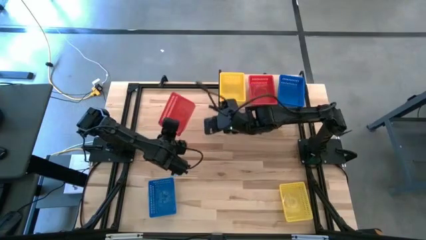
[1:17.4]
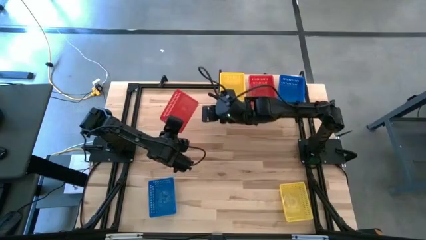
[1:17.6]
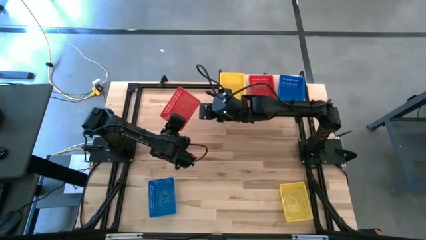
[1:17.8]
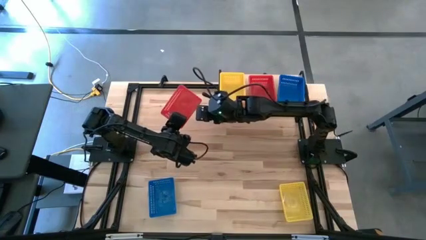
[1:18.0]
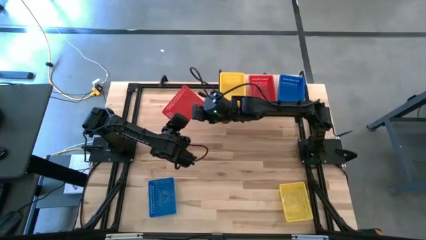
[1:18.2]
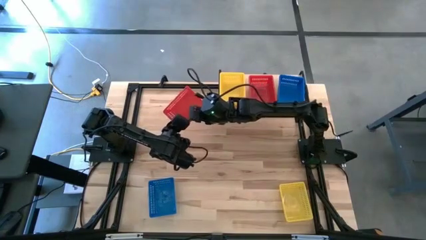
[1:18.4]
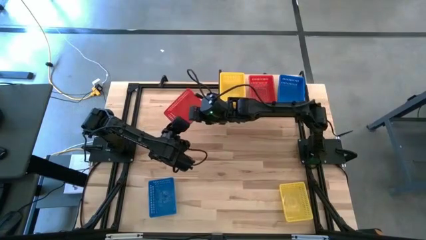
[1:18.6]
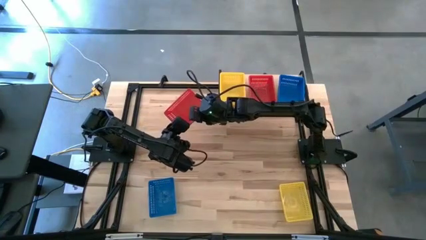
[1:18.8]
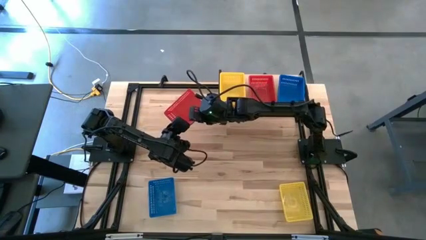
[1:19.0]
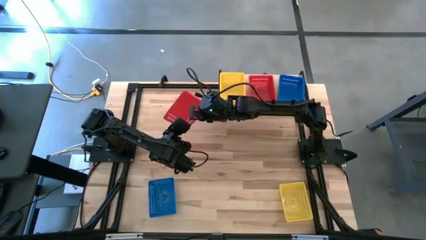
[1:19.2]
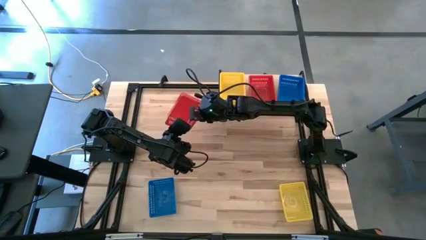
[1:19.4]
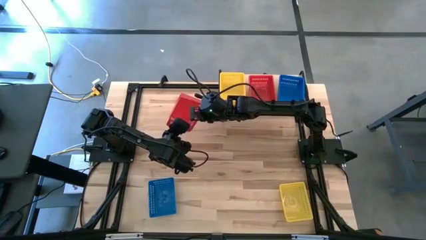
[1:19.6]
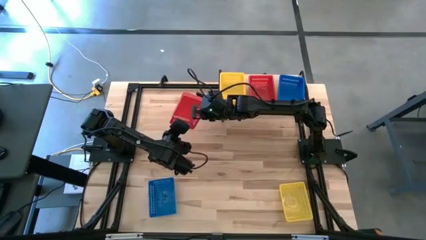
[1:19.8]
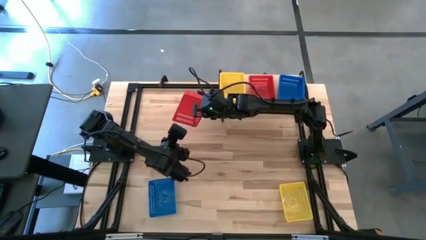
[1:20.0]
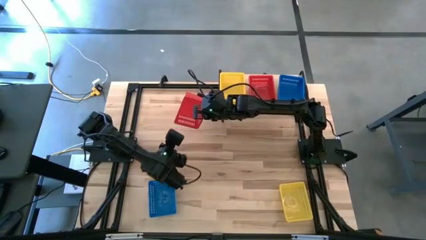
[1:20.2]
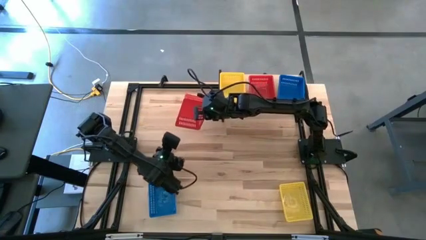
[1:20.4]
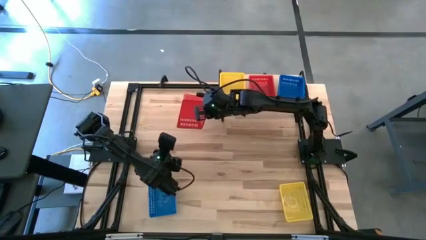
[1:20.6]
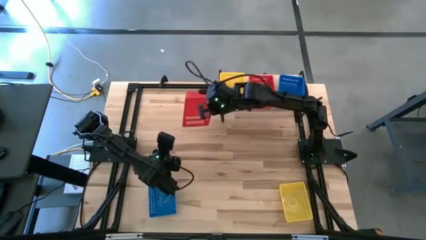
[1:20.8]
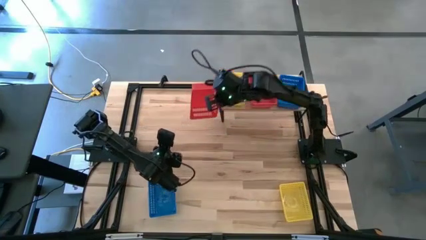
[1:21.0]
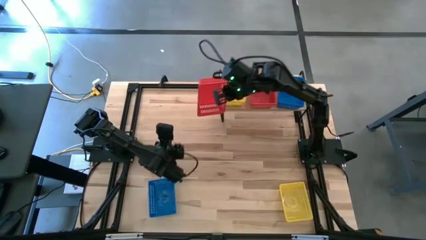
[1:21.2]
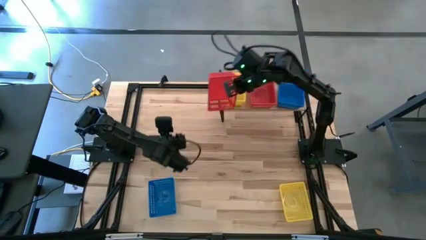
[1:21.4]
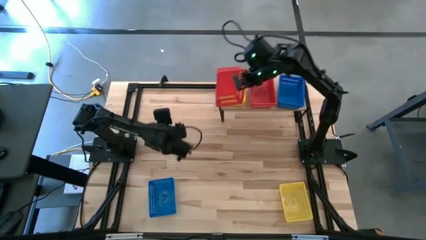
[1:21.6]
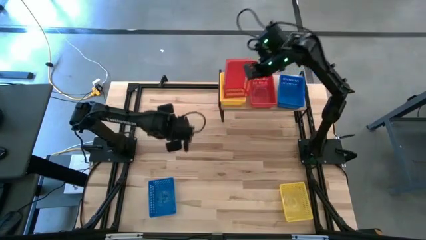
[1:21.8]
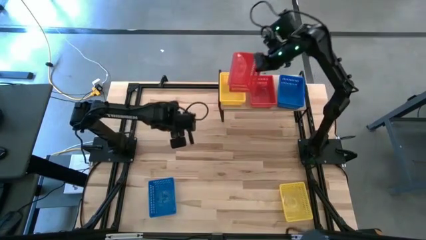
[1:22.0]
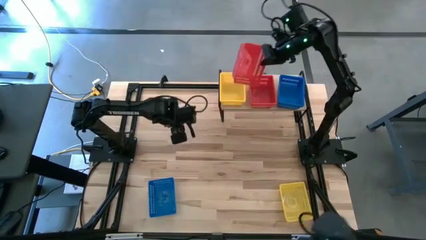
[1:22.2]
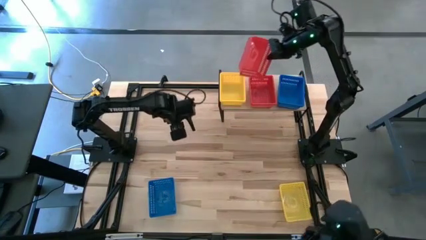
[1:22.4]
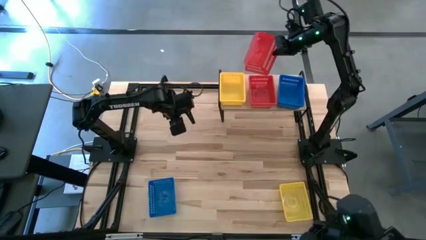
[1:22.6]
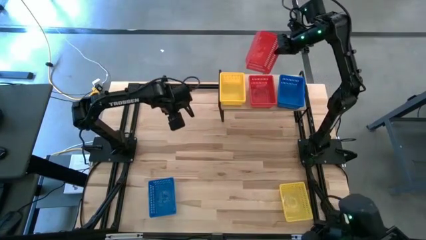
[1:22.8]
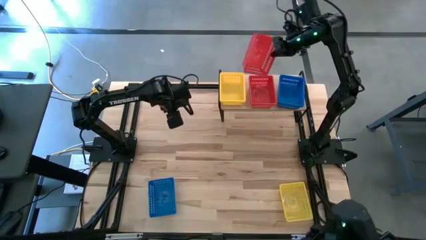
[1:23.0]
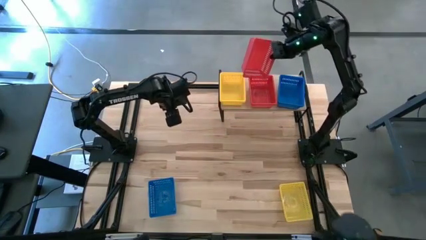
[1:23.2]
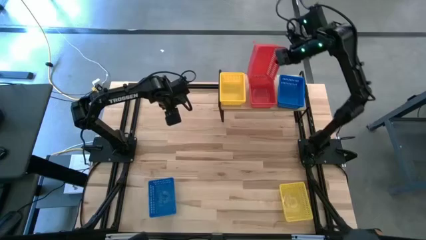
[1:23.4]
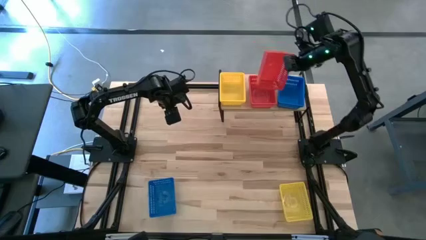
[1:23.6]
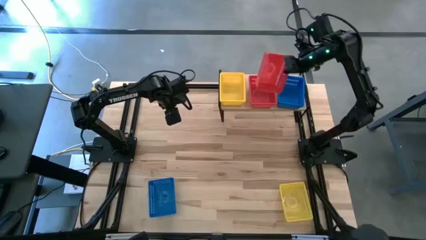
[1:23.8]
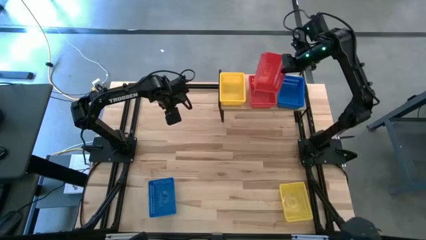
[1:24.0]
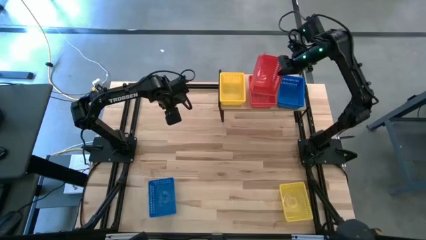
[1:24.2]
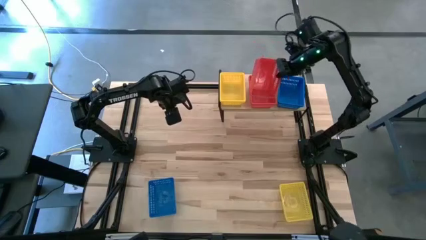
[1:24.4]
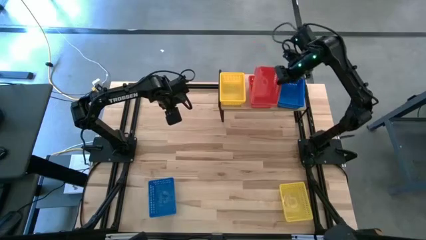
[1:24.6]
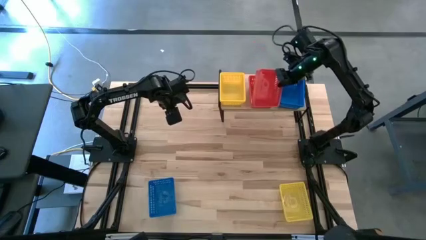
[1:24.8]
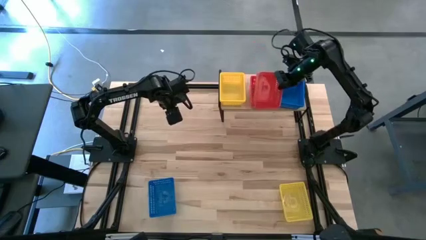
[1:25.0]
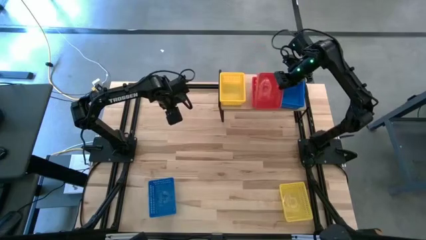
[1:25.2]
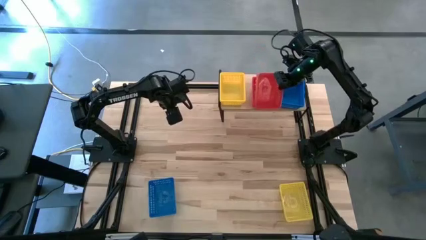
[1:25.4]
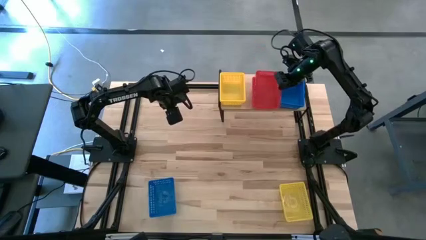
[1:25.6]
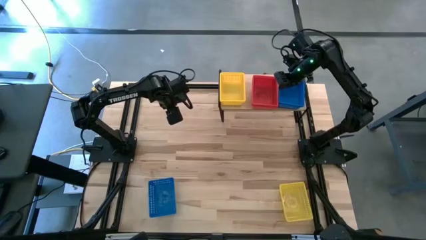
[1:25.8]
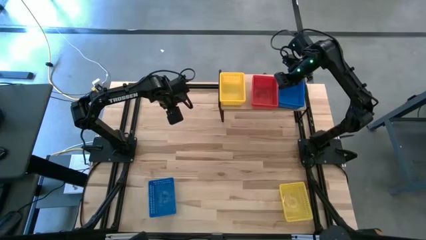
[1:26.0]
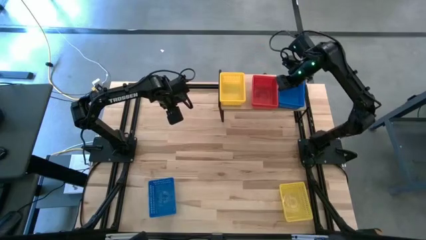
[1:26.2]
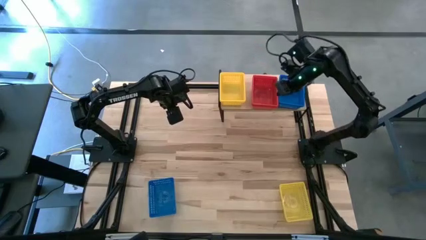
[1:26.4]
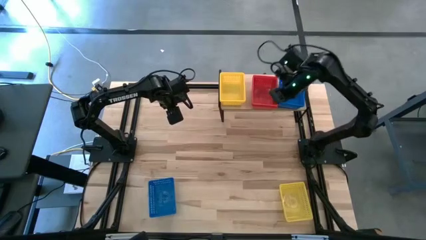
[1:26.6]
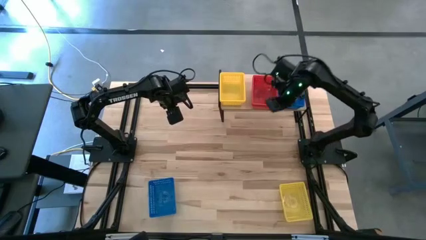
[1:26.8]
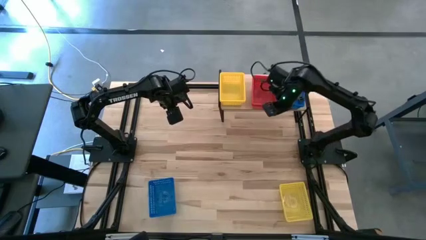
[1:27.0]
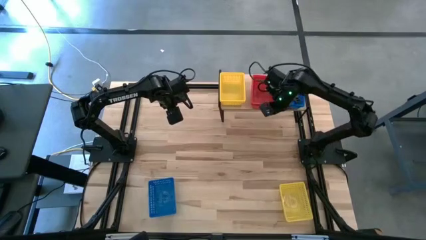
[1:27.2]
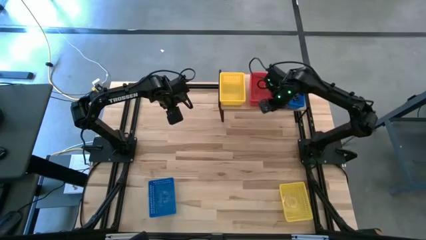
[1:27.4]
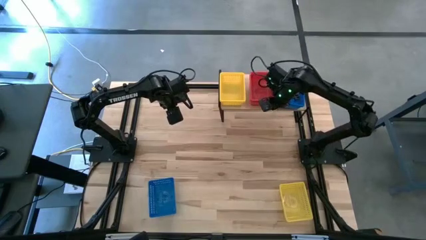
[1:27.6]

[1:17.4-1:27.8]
Task: Stack baskets on shelf by color
Stack the red basket on the stacked red baskets on the shelf
